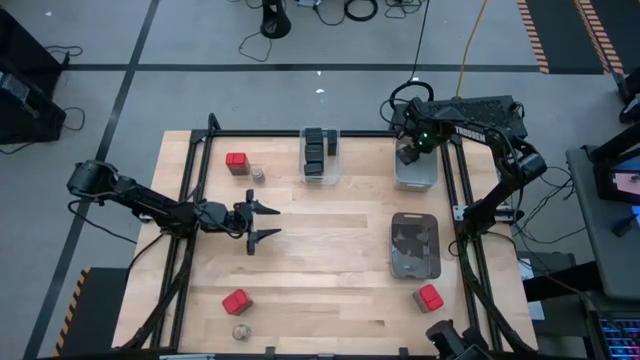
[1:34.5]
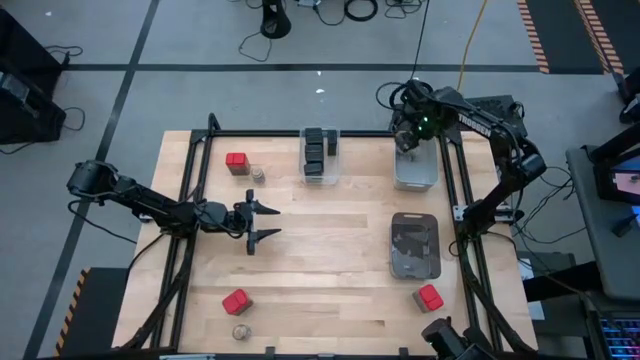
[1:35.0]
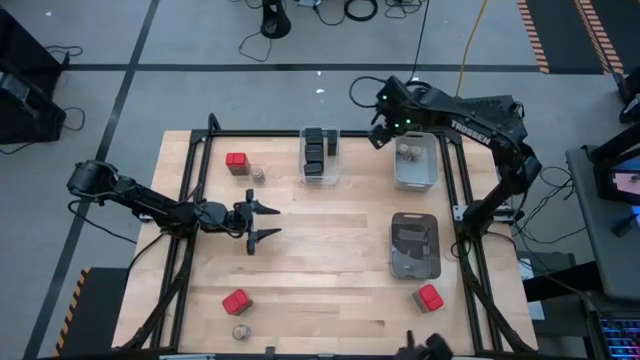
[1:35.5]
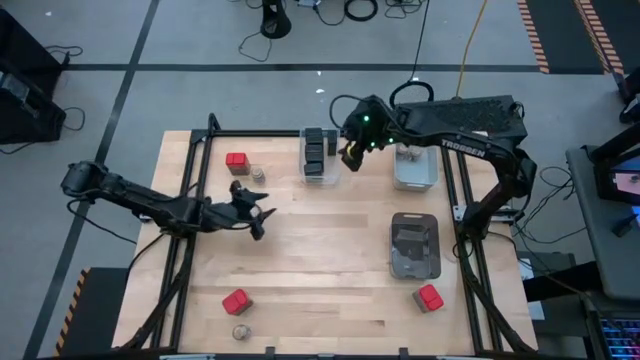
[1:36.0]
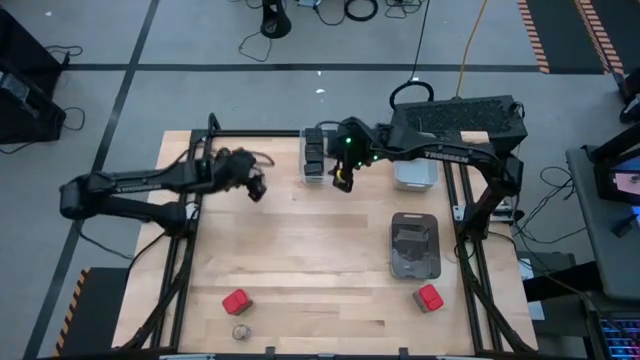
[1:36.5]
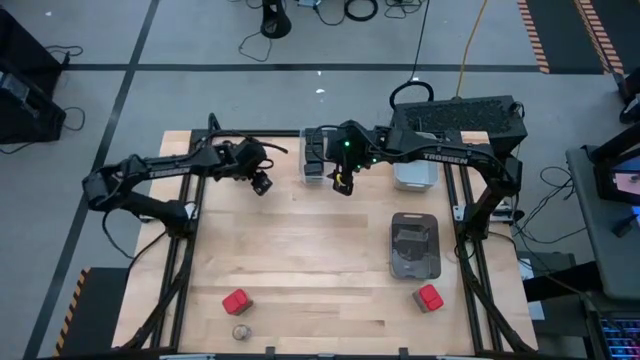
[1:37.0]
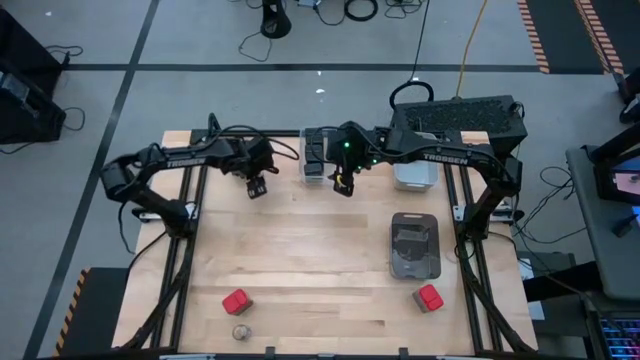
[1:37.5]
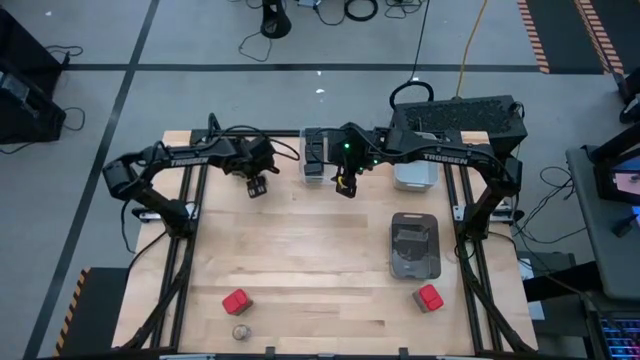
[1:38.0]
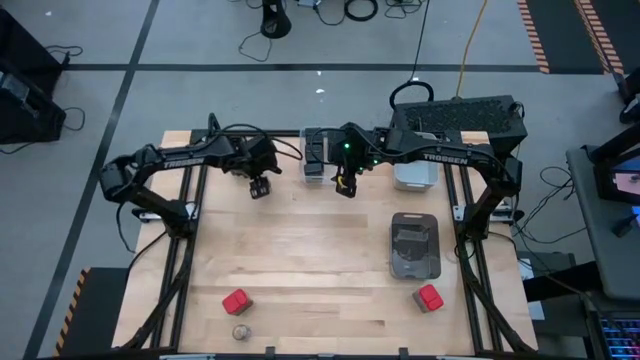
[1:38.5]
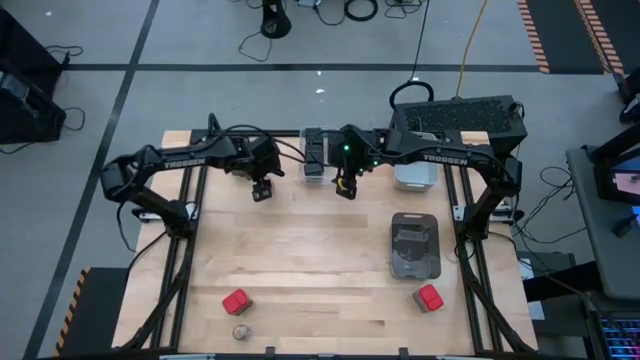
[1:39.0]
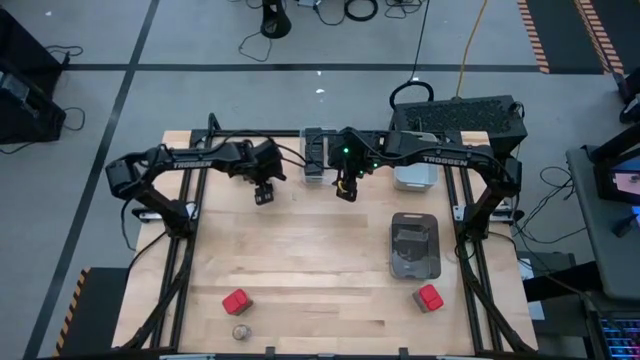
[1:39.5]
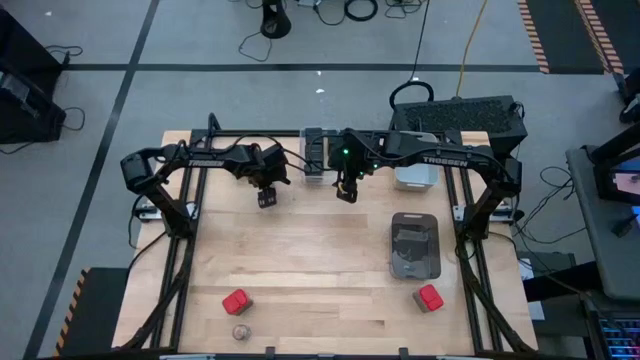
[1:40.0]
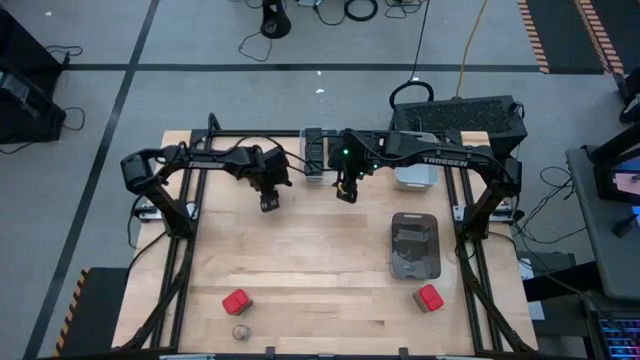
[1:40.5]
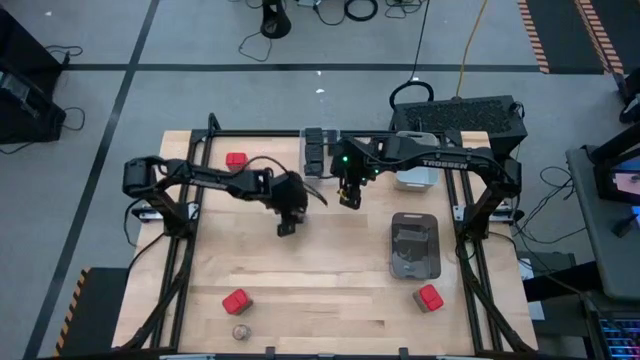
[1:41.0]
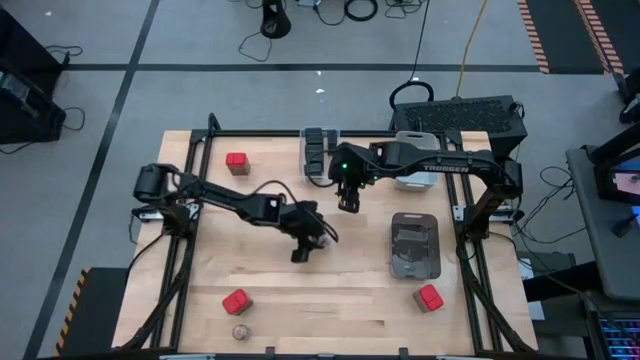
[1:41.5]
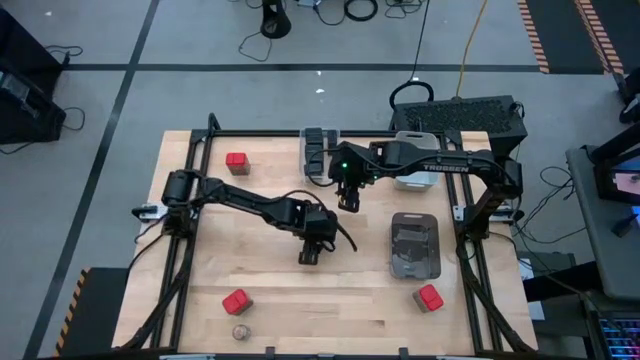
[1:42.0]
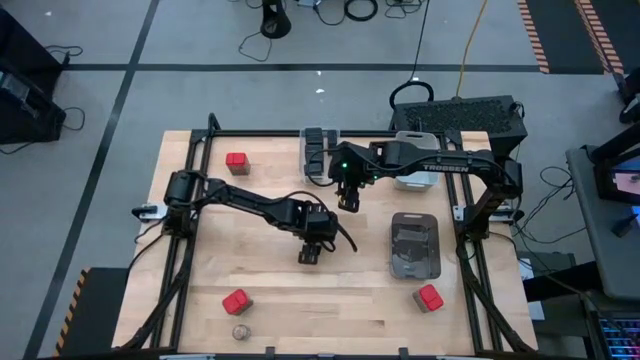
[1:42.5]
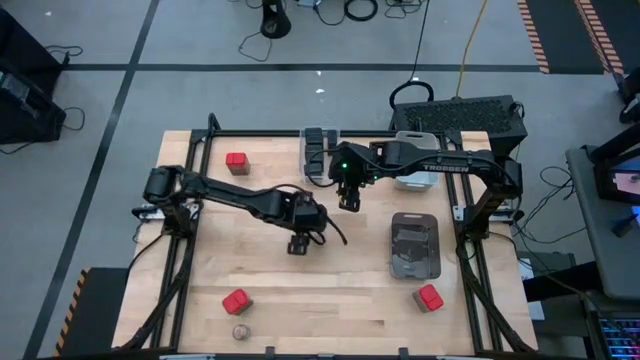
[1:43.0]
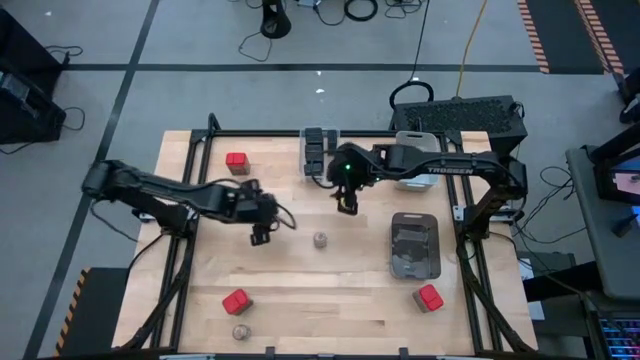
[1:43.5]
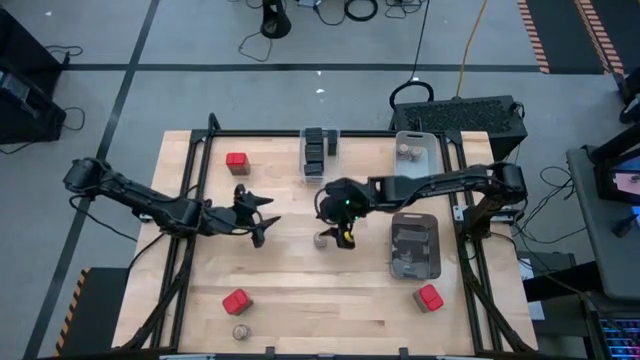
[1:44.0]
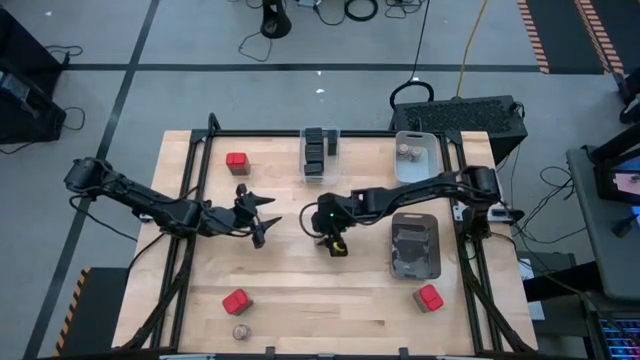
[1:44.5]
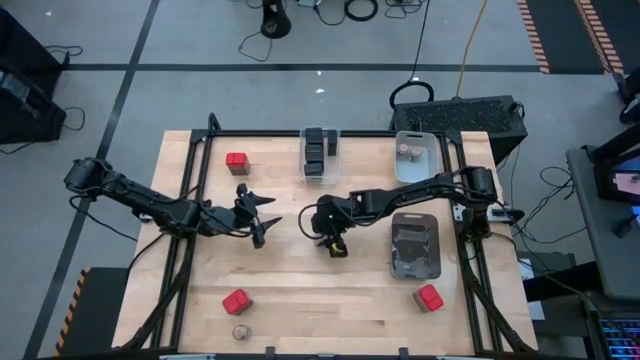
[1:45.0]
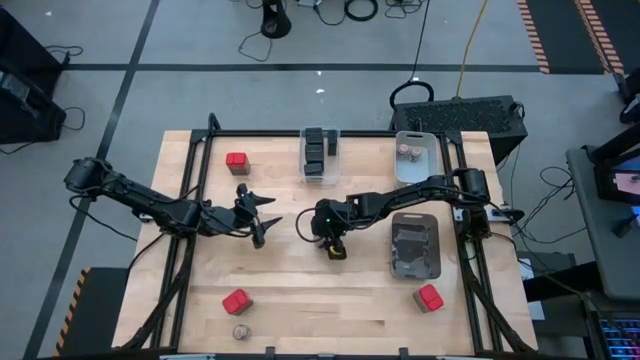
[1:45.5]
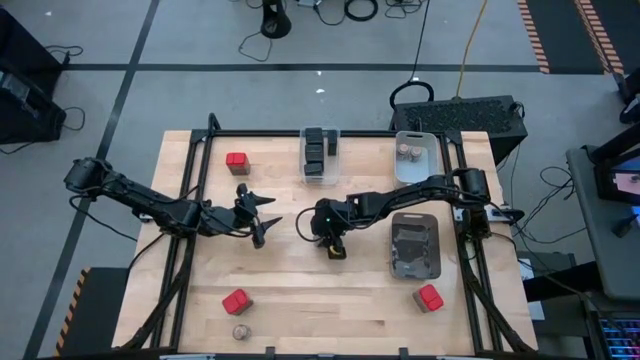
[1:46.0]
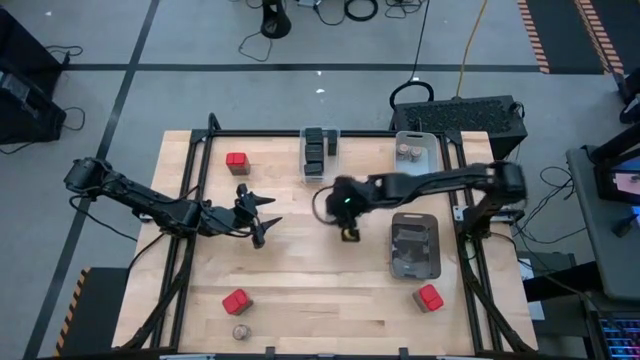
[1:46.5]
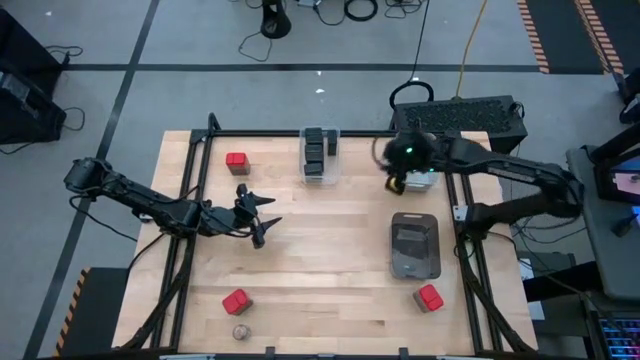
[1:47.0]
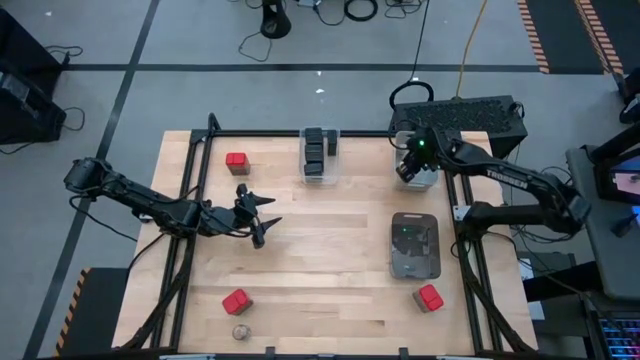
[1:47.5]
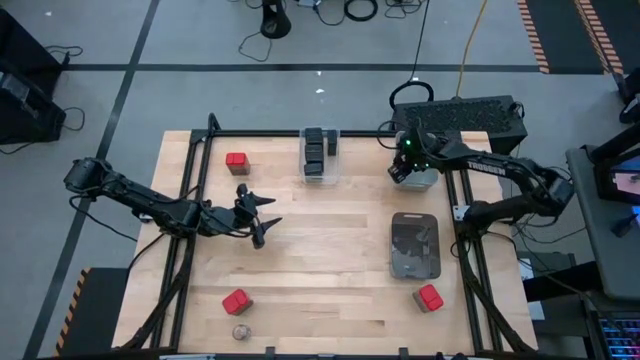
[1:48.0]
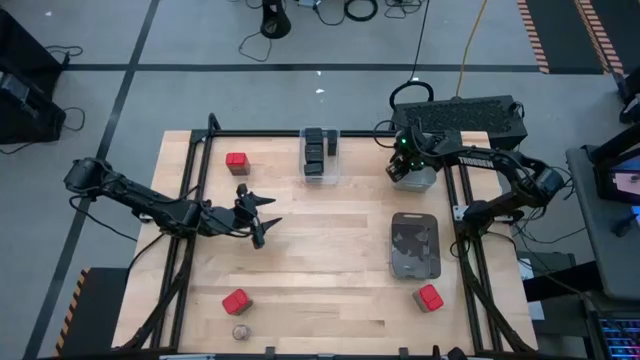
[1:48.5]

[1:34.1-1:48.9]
Task: Sort spices by type
Put the top transparent seasoning bottle into the gray bin

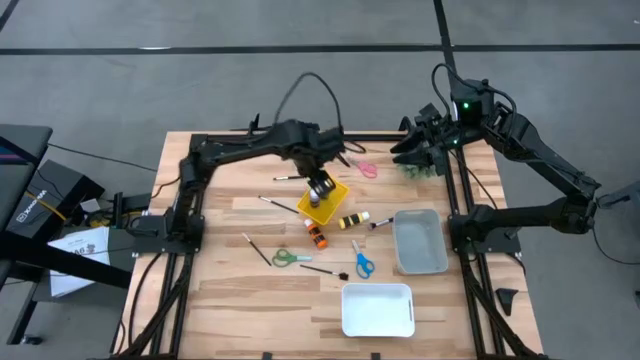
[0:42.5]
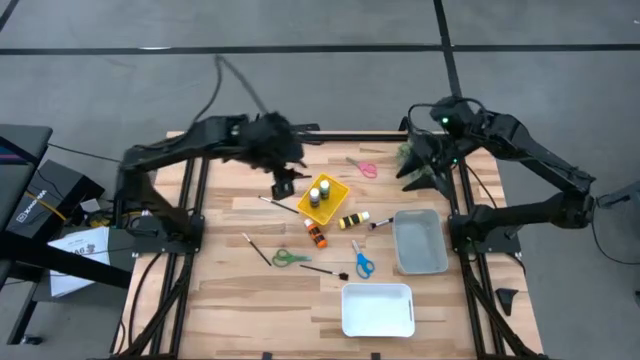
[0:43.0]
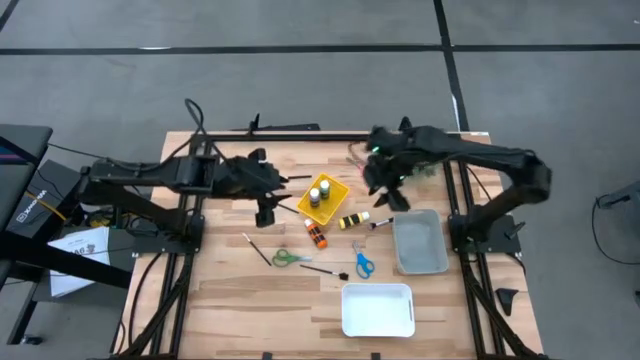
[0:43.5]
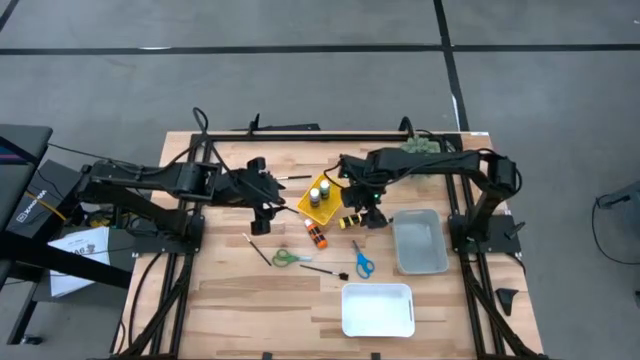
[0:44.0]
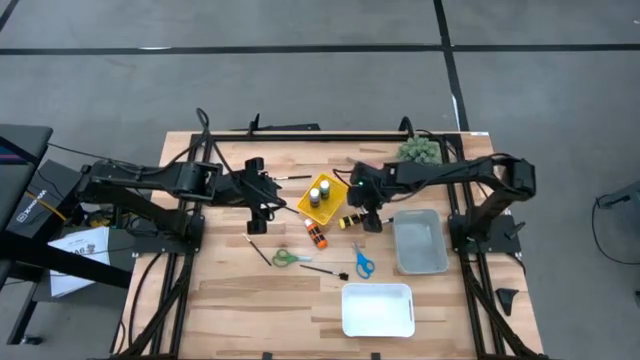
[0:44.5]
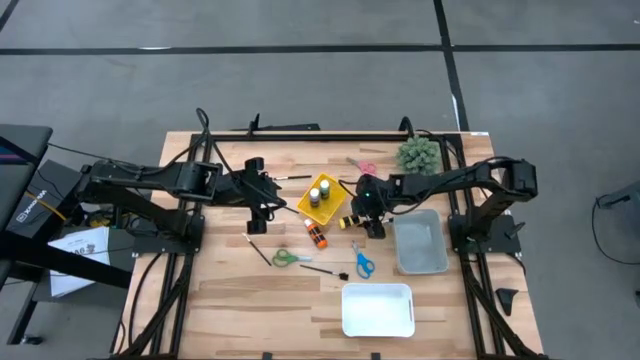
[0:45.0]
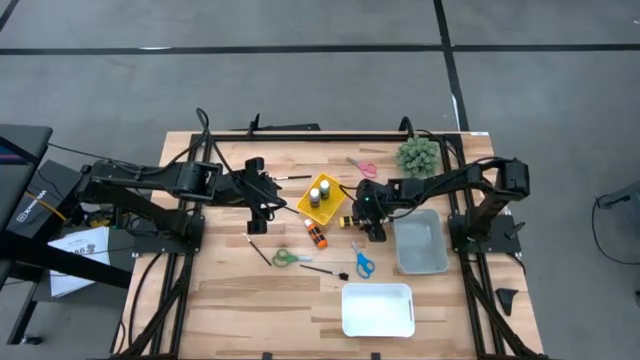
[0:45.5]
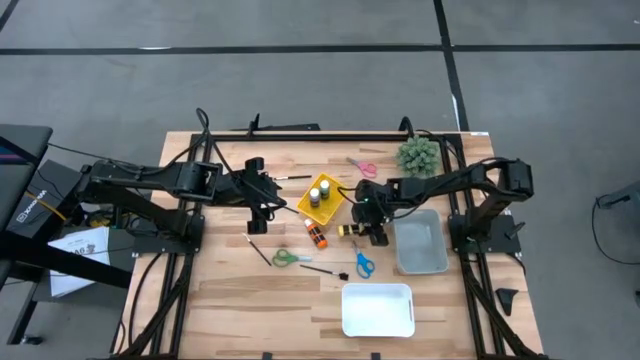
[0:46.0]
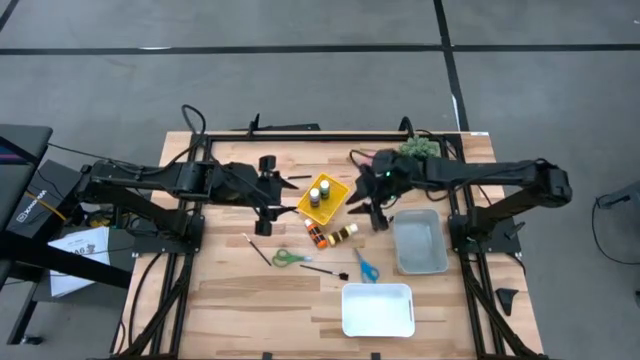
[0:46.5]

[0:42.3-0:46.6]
Task: Pick & Place Paint Supplies
Put the yellow paint bottle into the yellow bin
